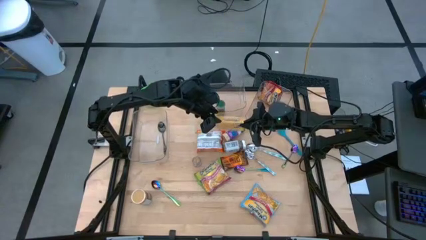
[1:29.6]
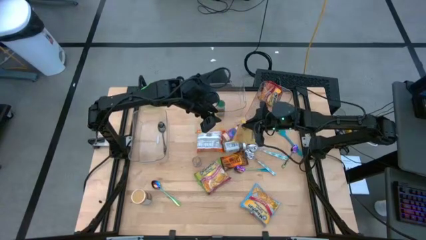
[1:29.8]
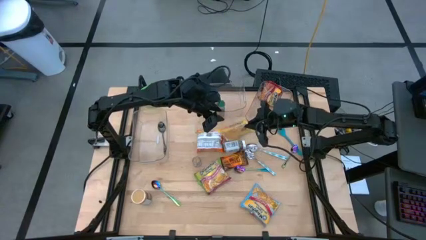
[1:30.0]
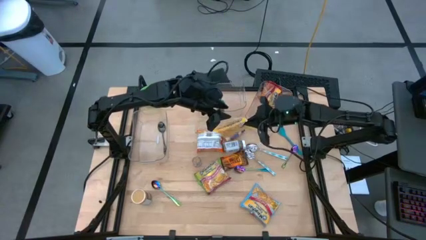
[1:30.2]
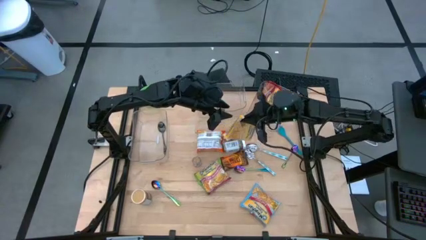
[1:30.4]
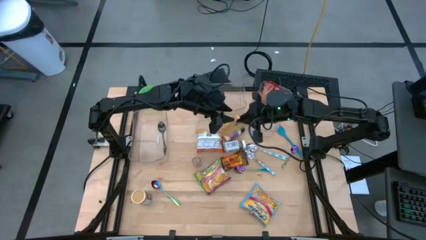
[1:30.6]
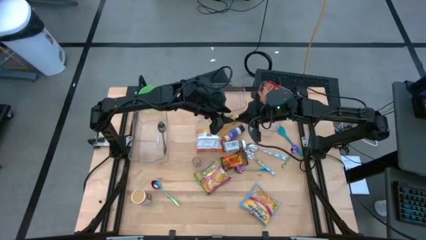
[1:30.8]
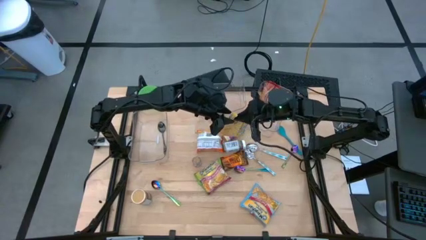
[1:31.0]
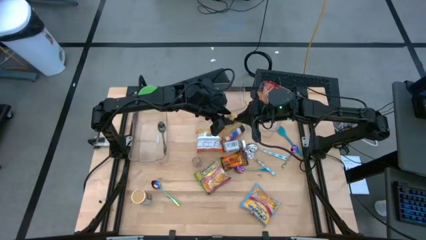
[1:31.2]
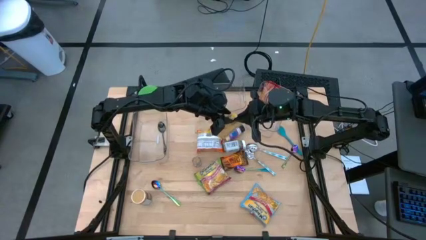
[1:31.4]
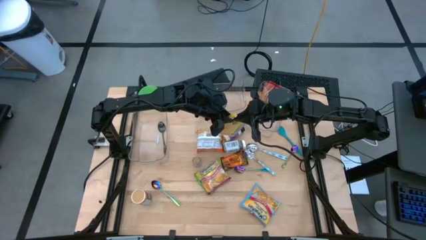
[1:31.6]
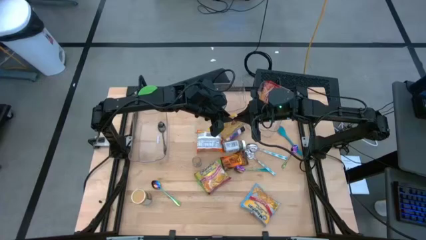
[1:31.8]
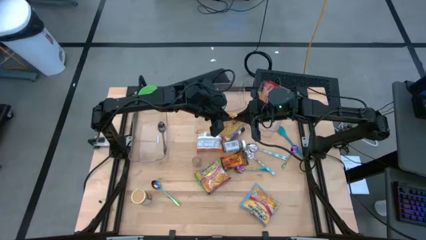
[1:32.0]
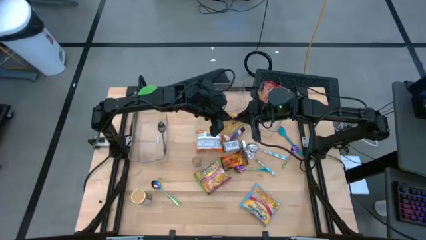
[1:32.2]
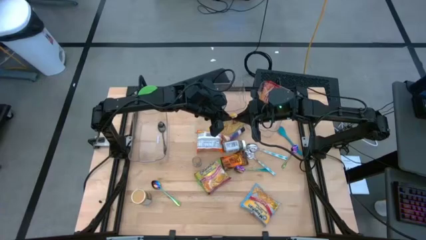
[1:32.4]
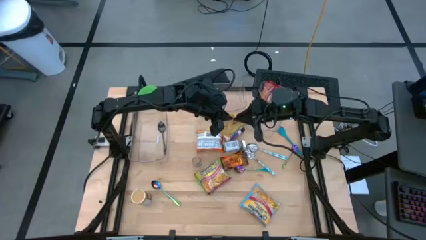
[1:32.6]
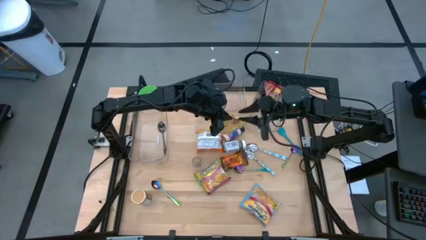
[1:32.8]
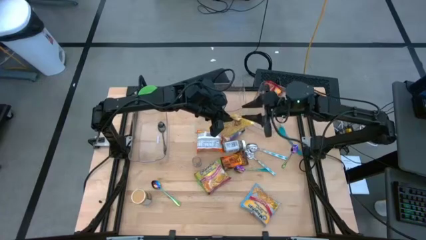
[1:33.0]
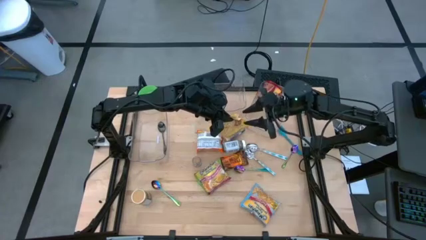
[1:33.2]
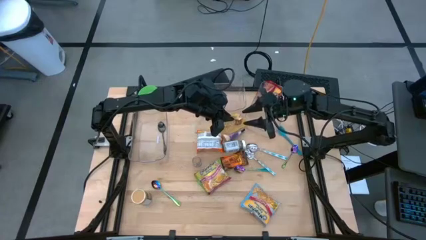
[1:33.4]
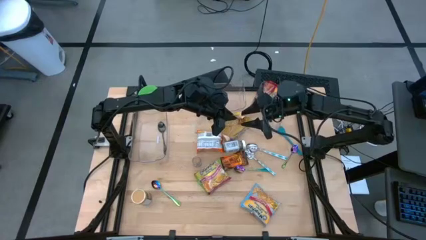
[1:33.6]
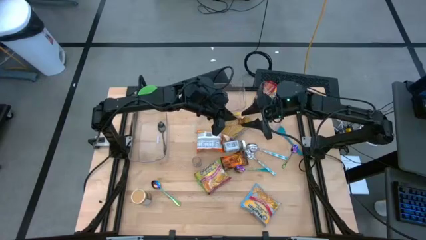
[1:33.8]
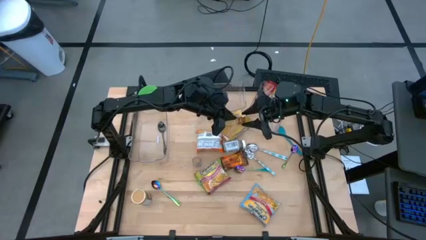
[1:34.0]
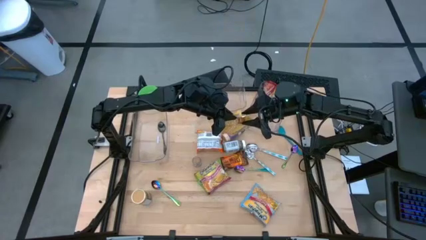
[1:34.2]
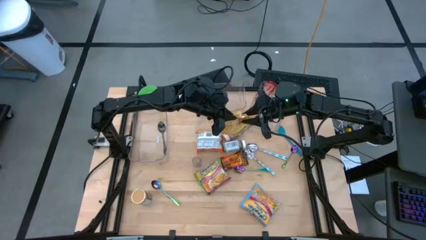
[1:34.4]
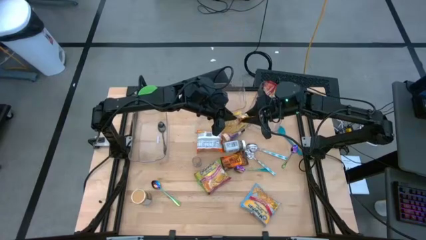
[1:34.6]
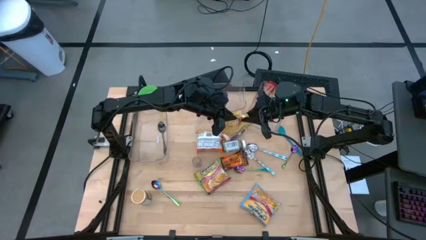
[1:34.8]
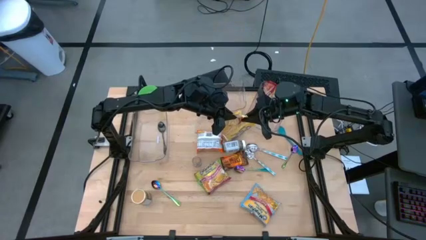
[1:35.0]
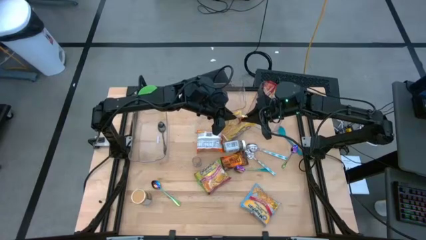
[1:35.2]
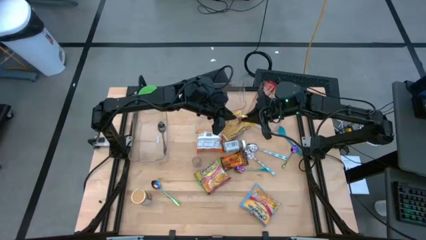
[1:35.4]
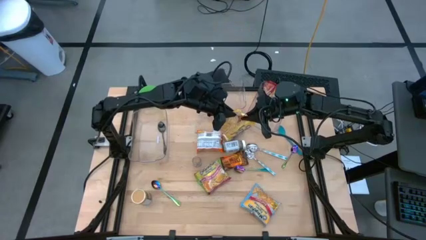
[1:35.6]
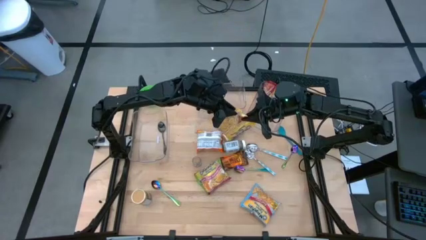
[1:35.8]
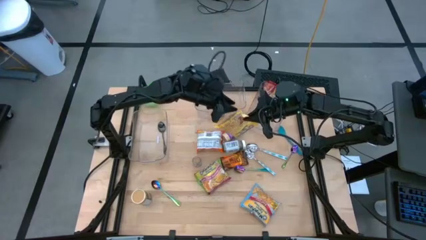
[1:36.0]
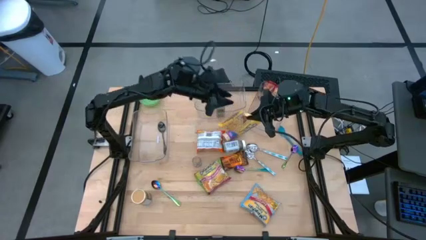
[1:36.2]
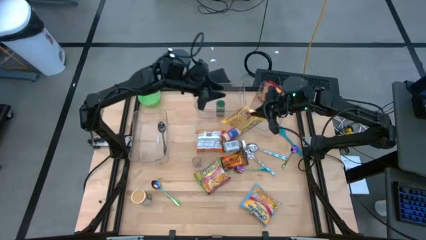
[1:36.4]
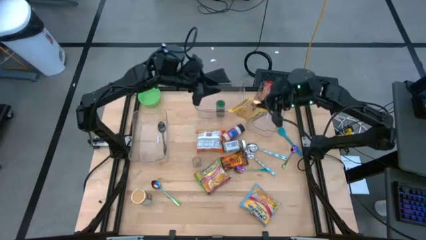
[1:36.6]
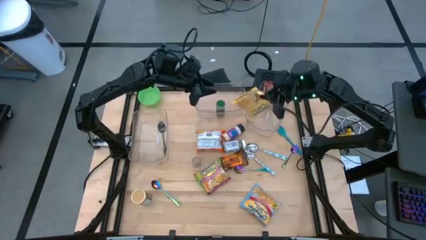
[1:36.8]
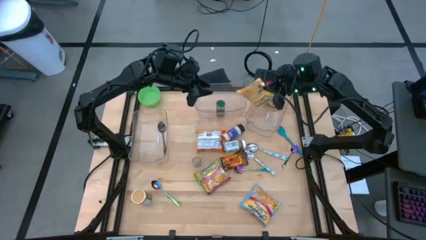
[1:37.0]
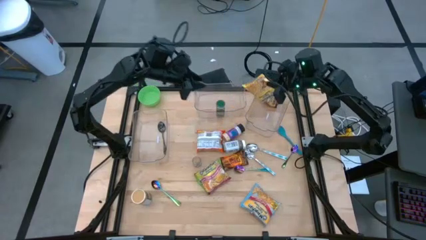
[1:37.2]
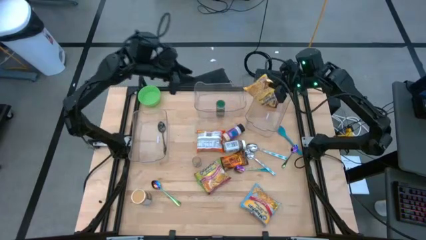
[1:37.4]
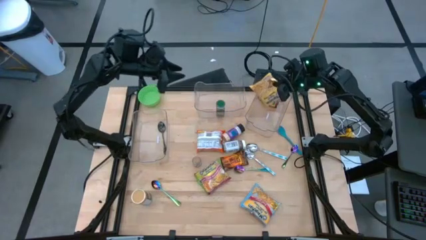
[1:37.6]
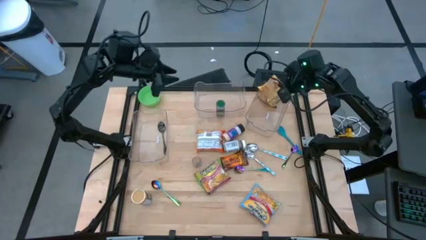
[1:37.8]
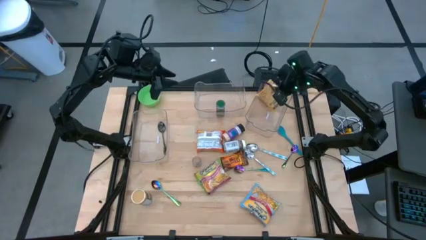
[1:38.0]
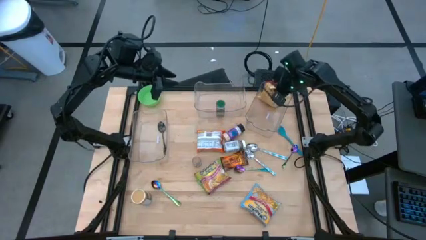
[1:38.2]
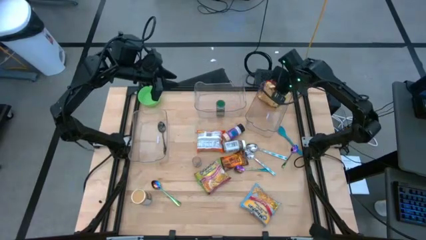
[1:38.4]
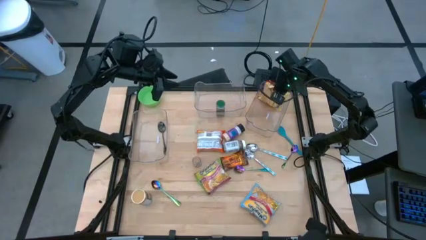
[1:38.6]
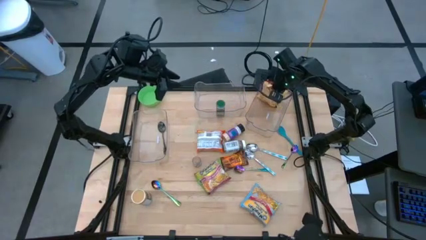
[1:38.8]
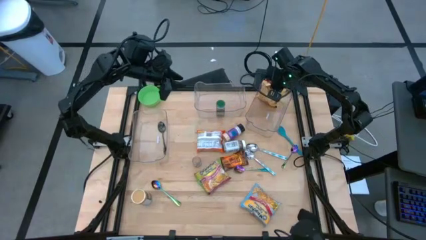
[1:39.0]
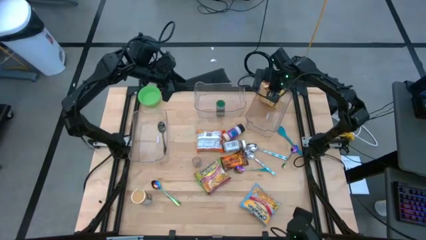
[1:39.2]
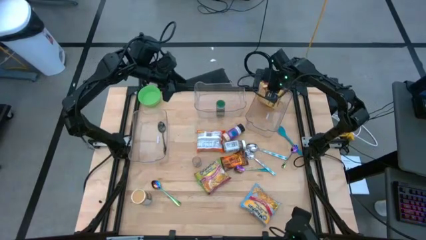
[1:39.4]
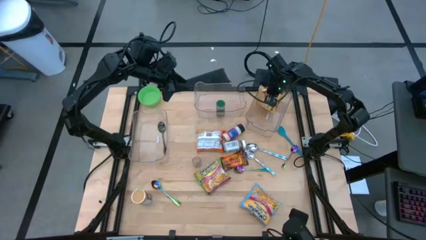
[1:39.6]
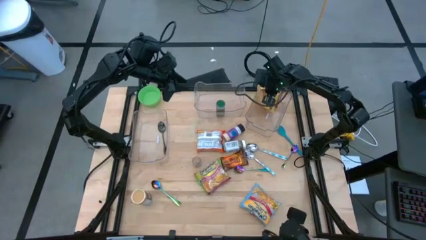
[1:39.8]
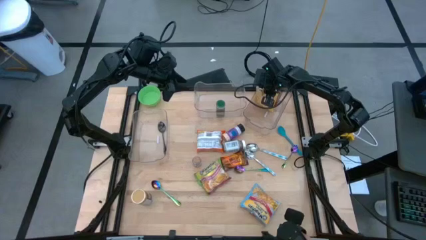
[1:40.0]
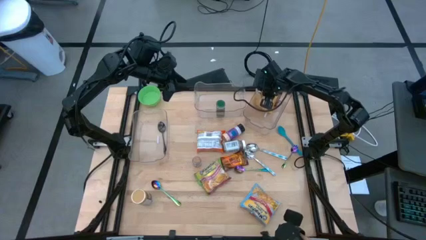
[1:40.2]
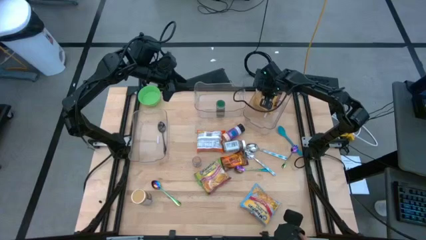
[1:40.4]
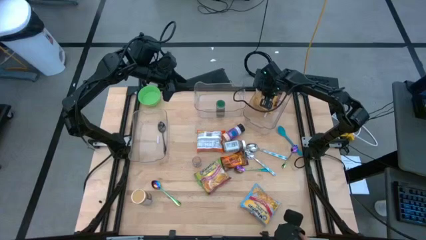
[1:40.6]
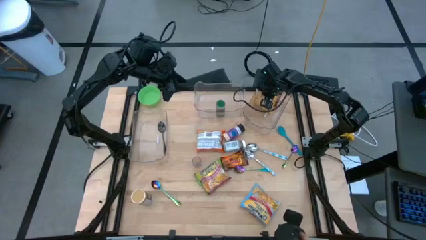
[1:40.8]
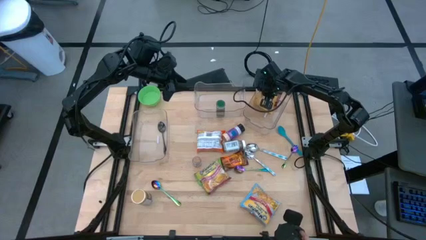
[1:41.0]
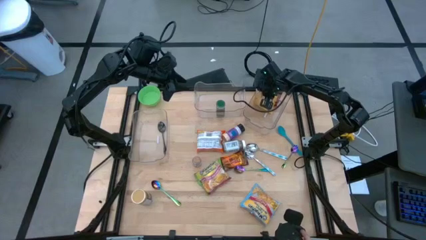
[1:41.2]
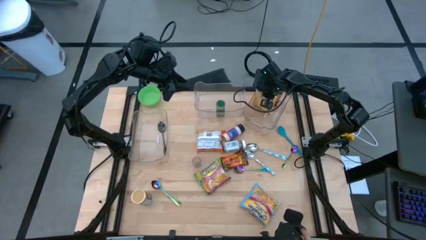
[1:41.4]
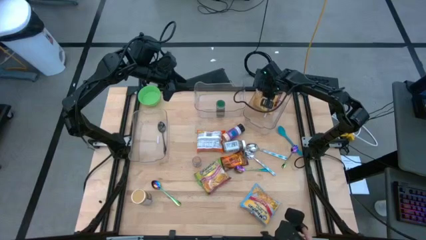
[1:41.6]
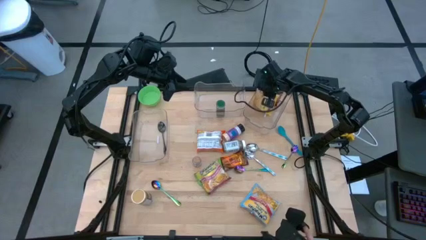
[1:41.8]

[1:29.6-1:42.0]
Task: Pick & Place Food Item
Put the yellow noodle pack into the right transparent bin

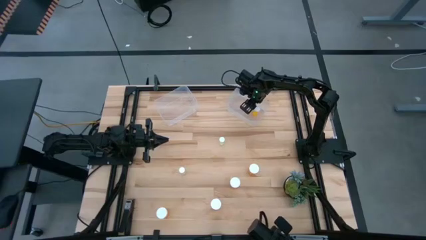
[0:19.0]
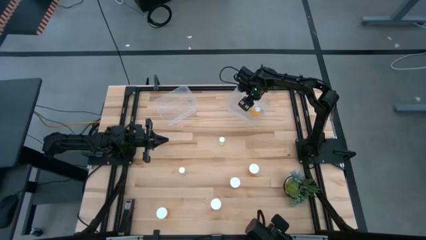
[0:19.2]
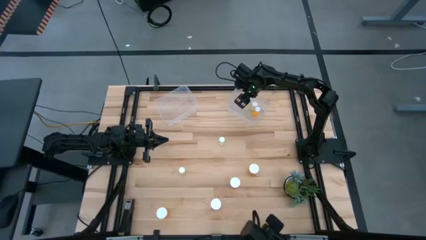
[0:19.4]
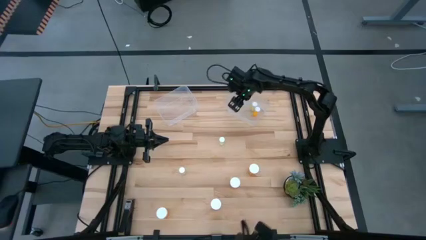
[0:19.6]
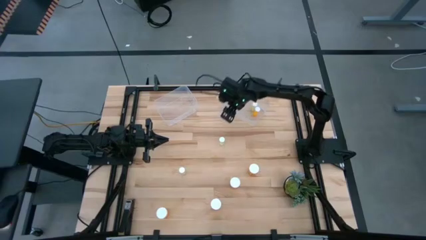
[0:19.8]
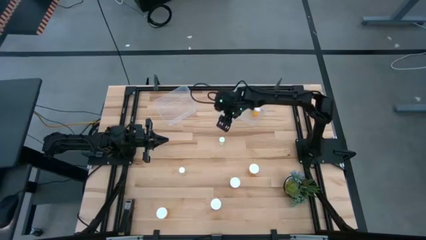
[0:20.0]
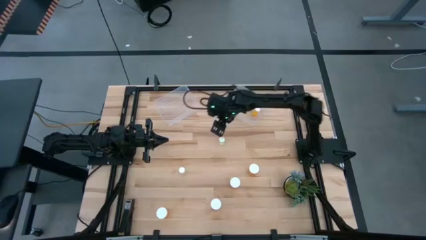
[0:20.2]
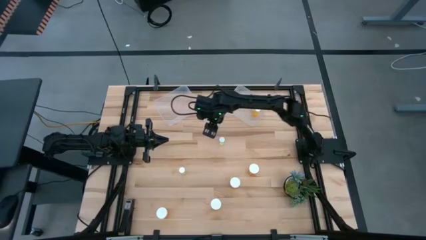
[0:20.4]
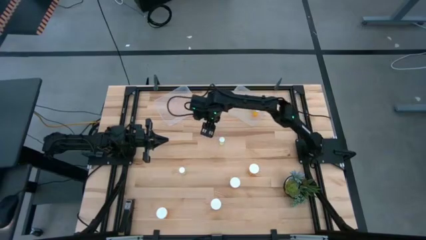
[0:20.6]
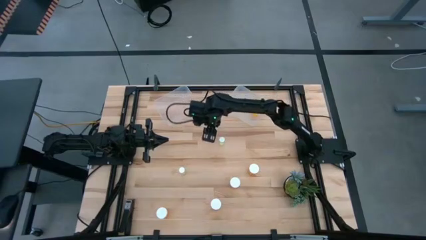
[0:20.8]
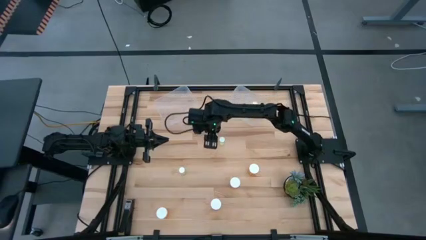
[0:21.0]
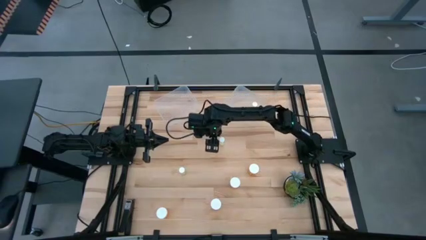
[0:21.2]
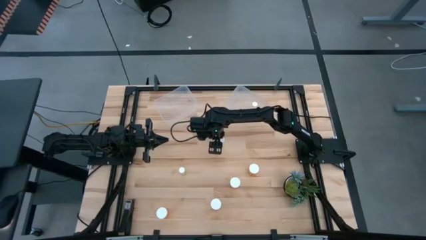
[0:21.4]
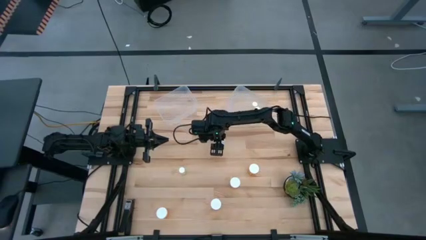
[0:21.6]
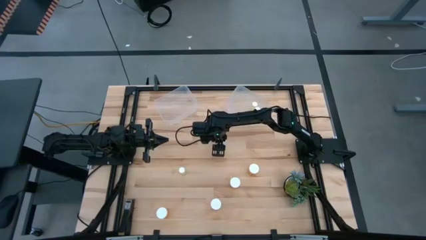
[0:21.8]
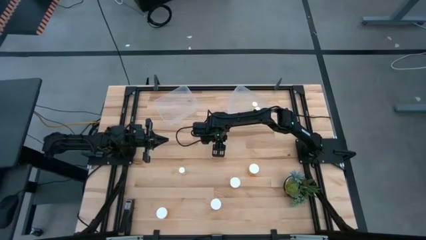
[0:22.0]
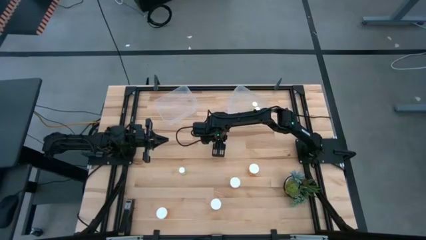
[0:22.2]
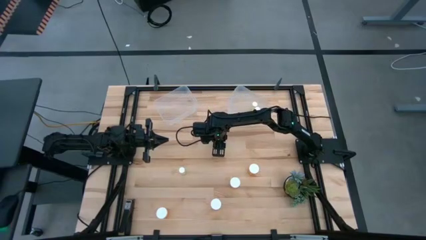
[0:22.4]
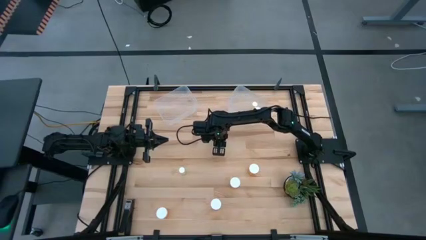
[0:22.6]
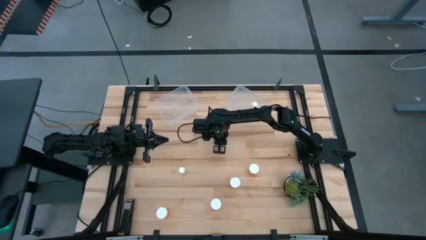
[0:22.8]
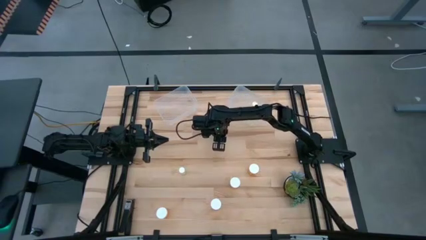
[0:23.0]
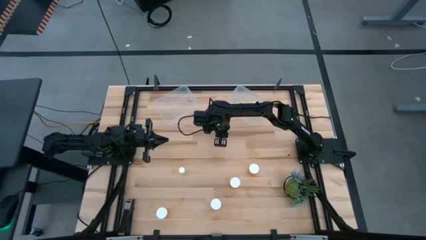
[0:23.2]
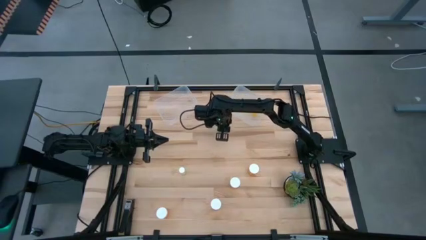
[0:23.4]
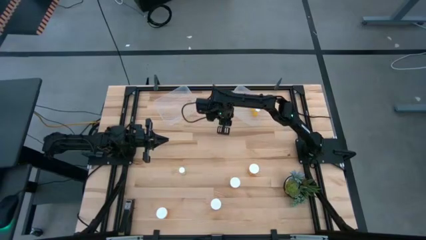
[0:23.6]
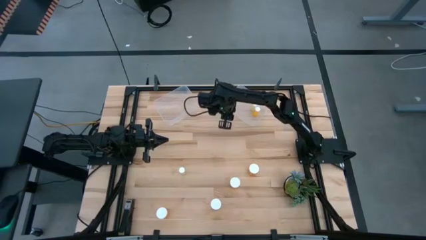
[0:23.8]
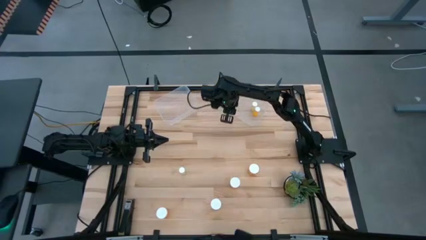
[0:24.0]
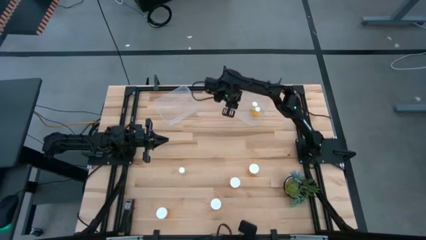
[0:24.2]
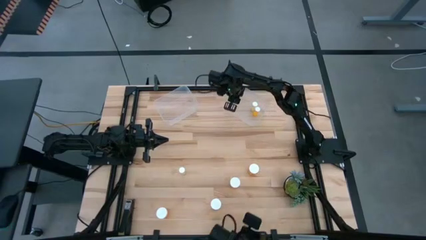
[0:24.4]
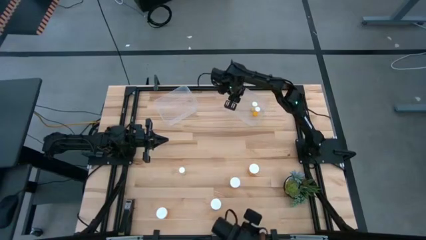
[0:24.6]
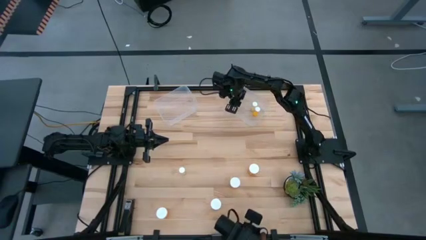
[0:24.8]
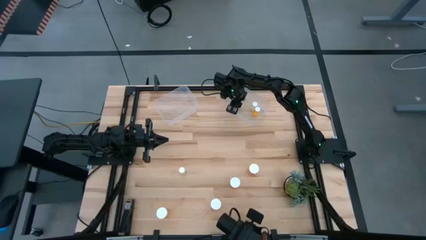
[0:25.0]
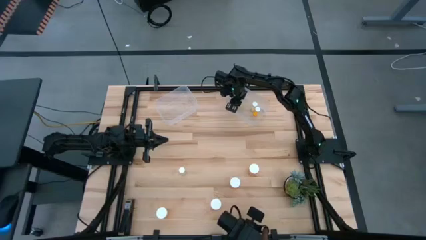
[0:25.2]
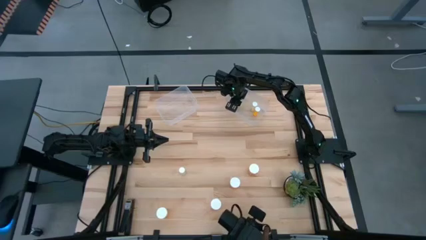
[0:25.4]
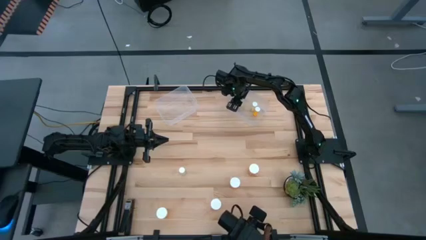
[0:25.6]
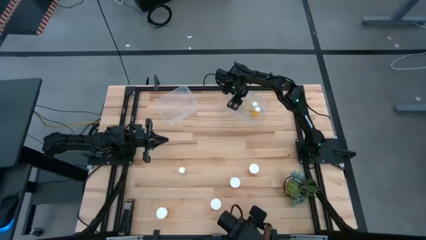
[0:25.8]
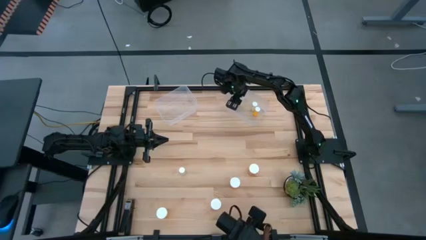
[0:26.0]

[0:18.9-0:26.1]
Task: Pick and place medicine bottles into bin by pill shape (circle, oval)
Put the small yellow pill bottle into the right transparent bin
